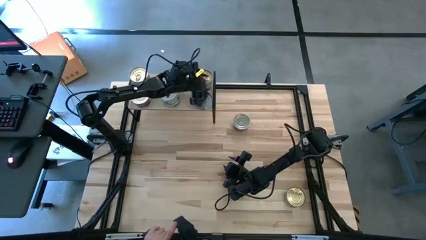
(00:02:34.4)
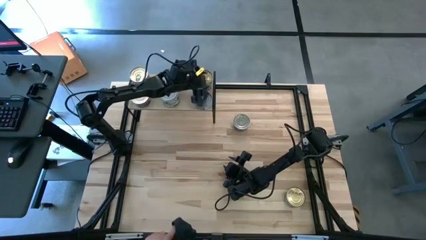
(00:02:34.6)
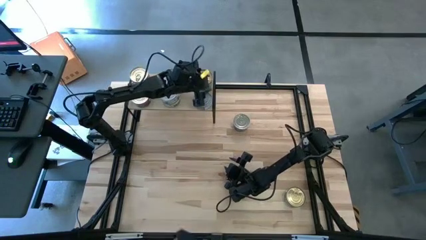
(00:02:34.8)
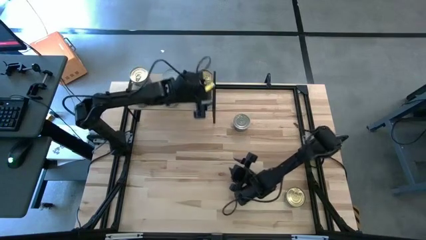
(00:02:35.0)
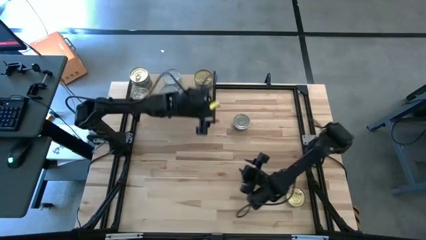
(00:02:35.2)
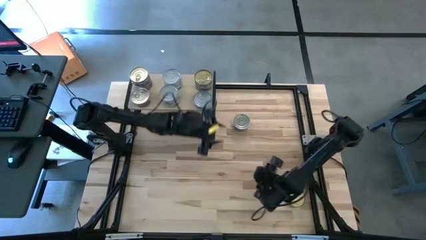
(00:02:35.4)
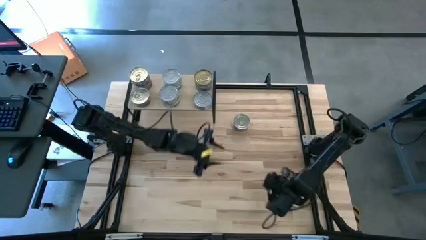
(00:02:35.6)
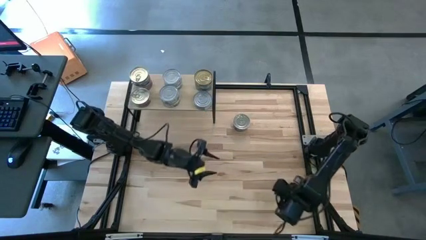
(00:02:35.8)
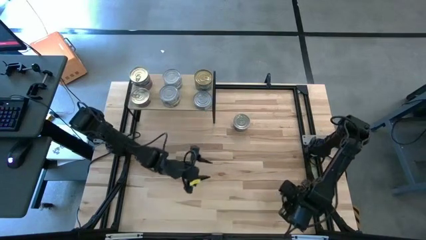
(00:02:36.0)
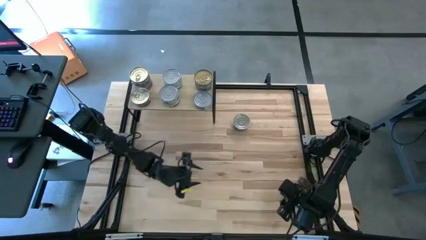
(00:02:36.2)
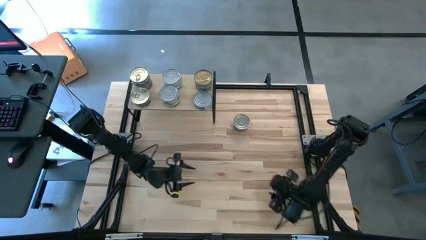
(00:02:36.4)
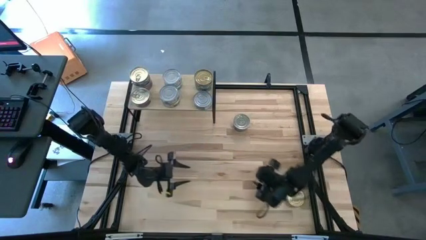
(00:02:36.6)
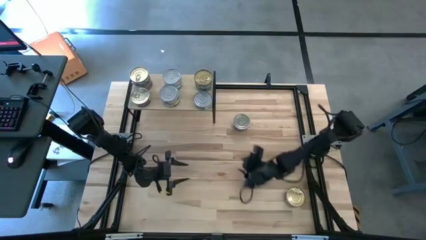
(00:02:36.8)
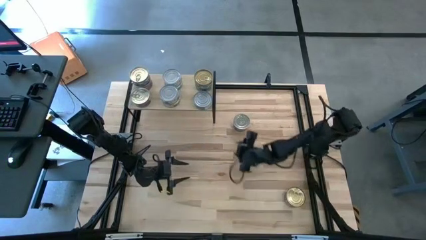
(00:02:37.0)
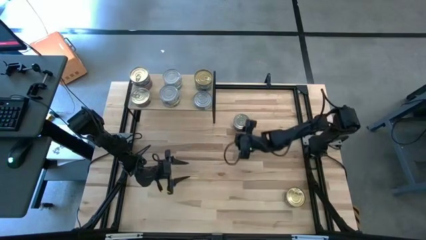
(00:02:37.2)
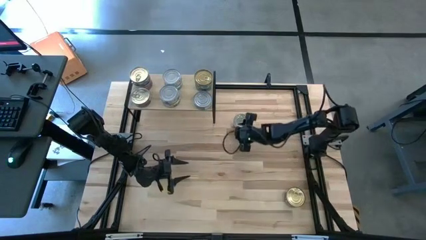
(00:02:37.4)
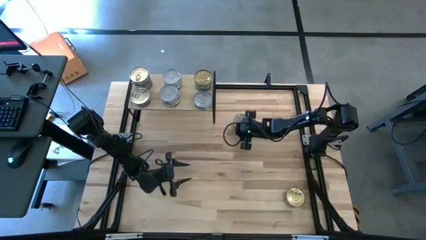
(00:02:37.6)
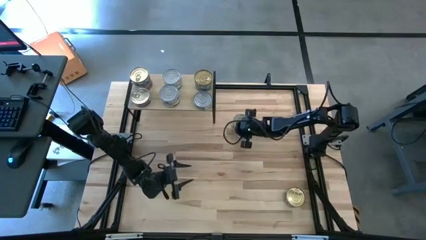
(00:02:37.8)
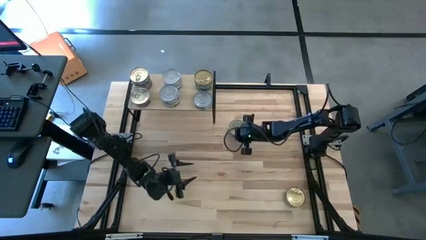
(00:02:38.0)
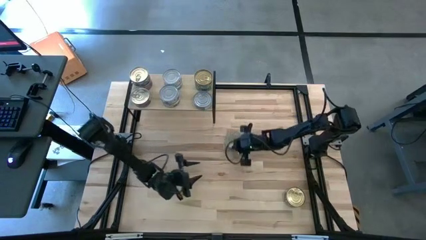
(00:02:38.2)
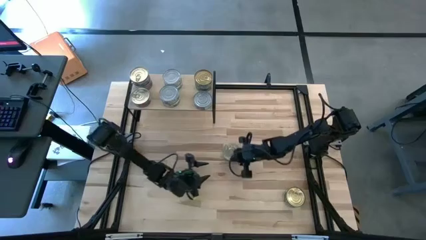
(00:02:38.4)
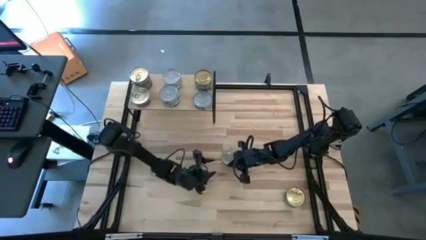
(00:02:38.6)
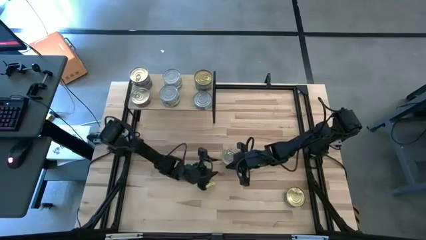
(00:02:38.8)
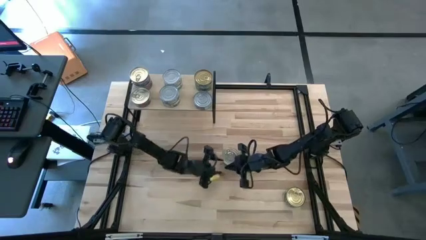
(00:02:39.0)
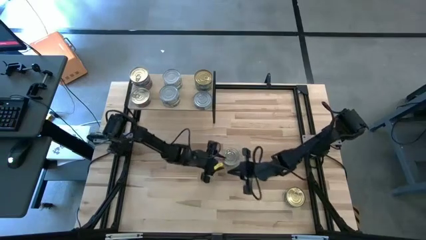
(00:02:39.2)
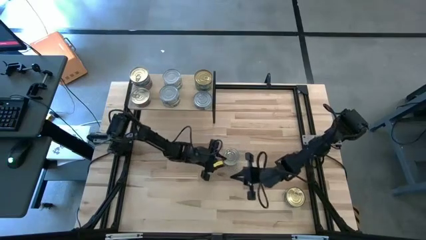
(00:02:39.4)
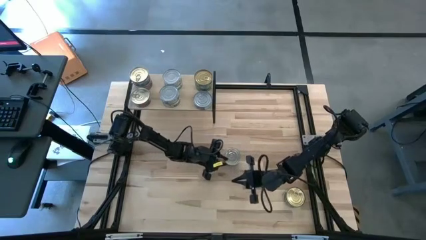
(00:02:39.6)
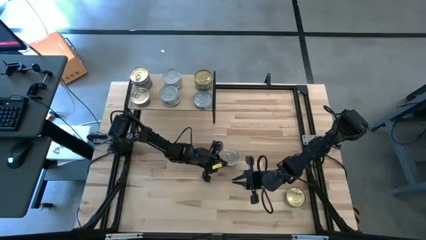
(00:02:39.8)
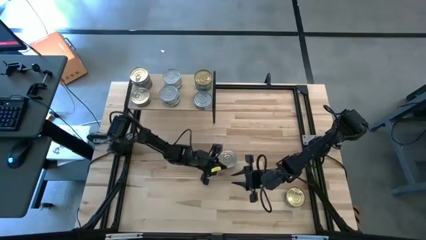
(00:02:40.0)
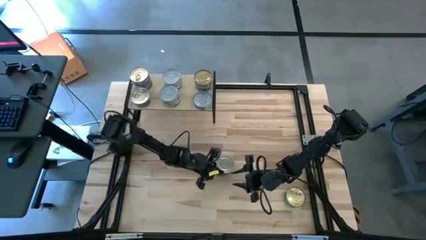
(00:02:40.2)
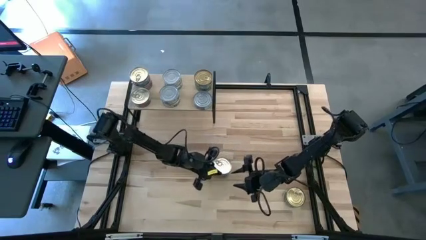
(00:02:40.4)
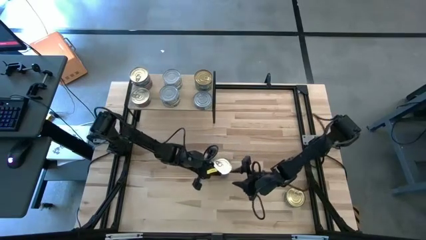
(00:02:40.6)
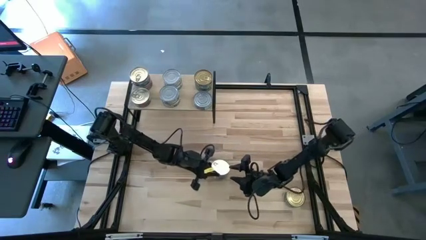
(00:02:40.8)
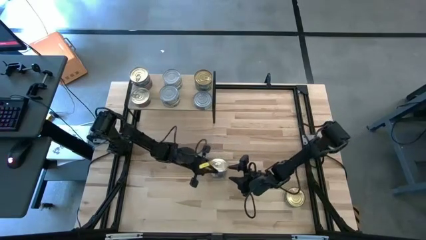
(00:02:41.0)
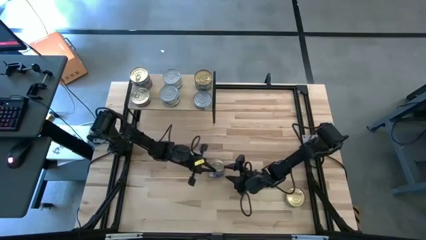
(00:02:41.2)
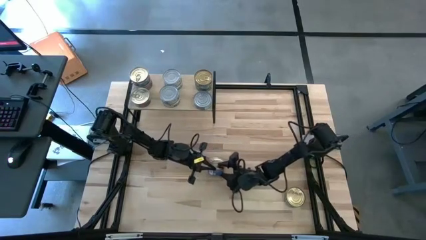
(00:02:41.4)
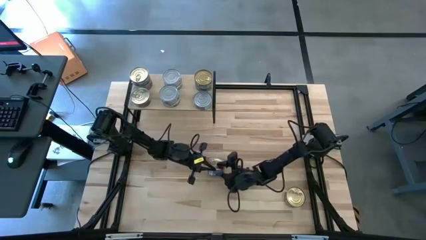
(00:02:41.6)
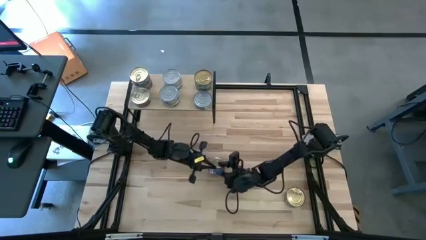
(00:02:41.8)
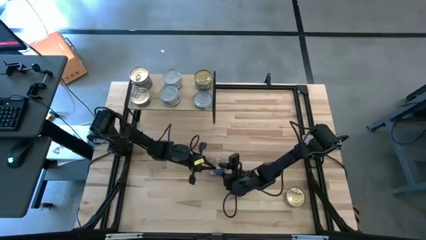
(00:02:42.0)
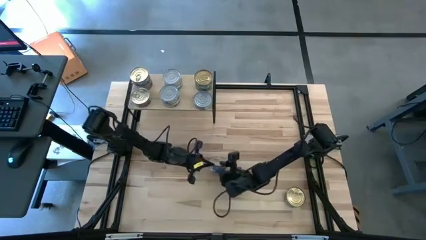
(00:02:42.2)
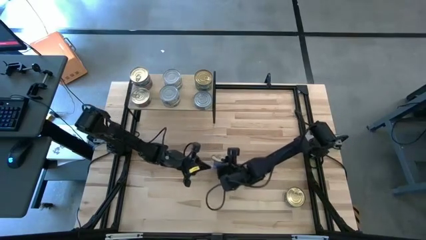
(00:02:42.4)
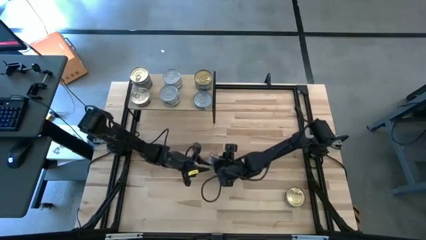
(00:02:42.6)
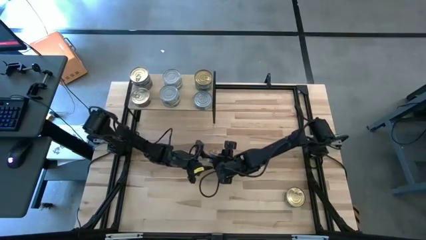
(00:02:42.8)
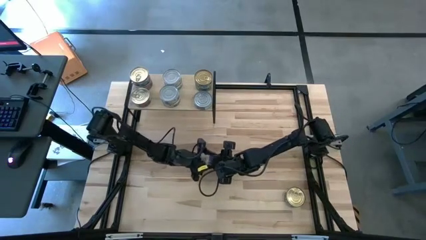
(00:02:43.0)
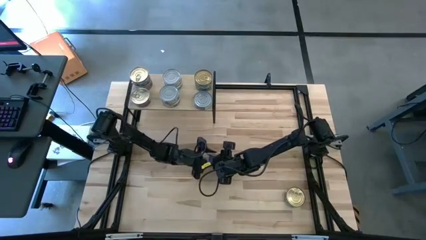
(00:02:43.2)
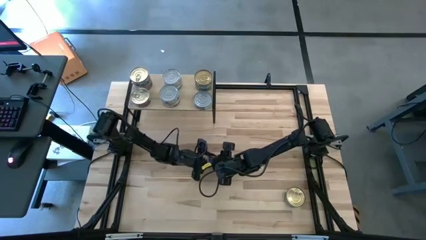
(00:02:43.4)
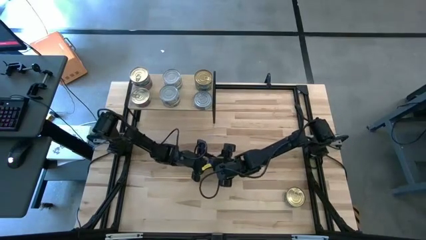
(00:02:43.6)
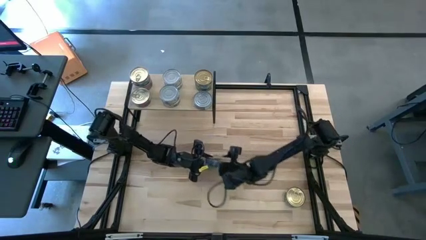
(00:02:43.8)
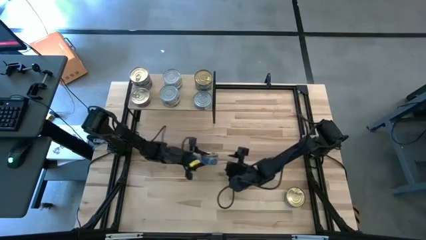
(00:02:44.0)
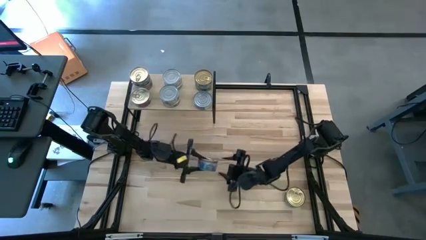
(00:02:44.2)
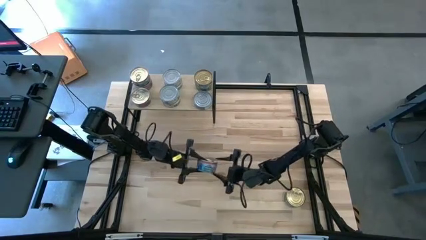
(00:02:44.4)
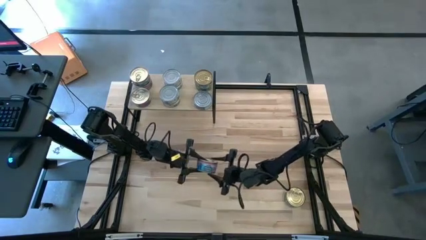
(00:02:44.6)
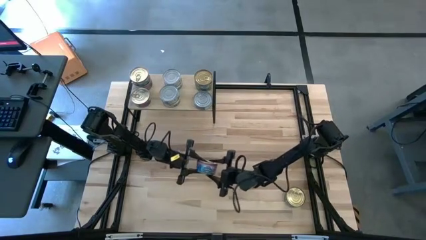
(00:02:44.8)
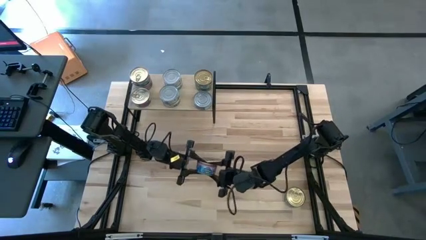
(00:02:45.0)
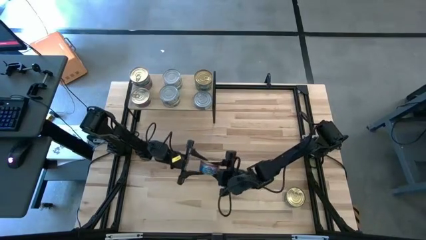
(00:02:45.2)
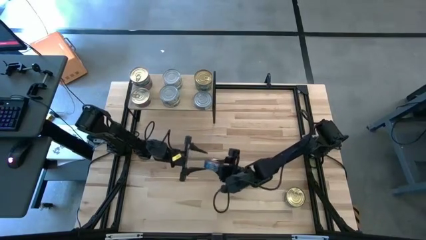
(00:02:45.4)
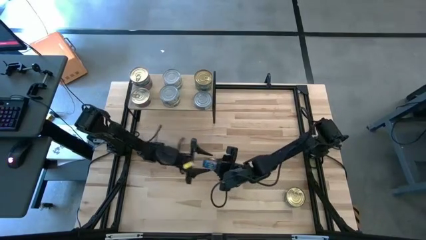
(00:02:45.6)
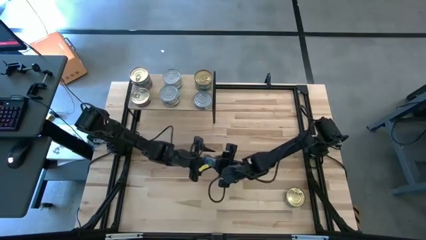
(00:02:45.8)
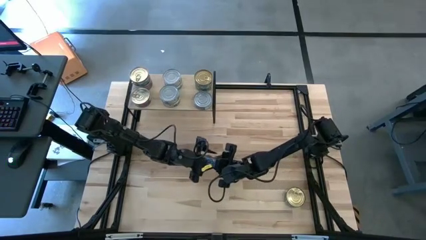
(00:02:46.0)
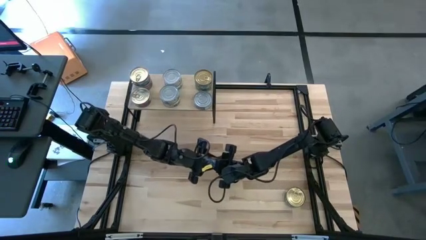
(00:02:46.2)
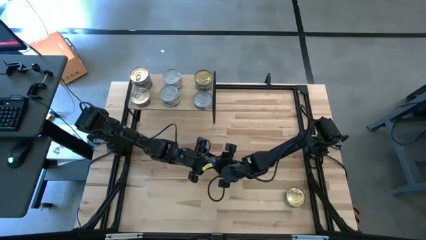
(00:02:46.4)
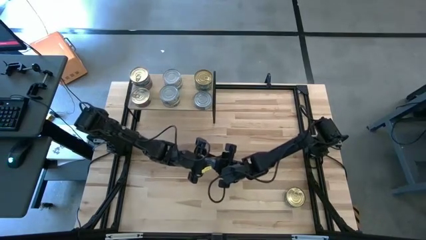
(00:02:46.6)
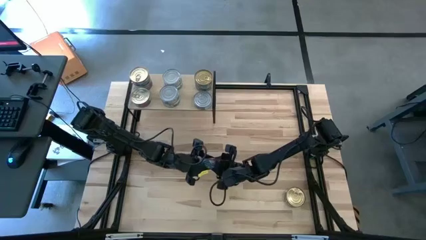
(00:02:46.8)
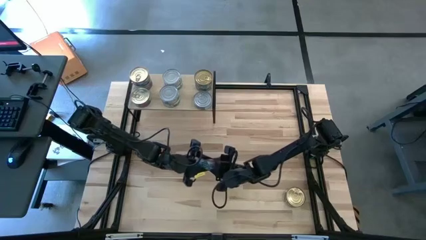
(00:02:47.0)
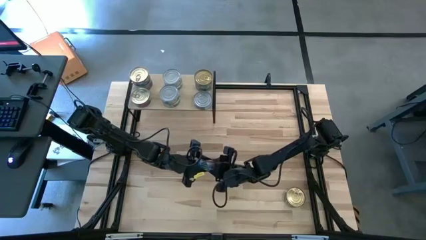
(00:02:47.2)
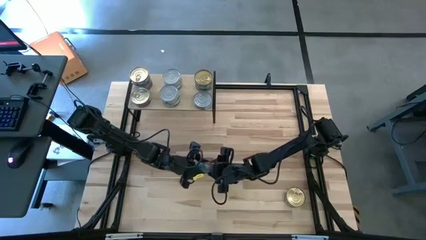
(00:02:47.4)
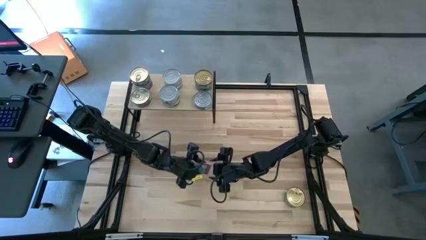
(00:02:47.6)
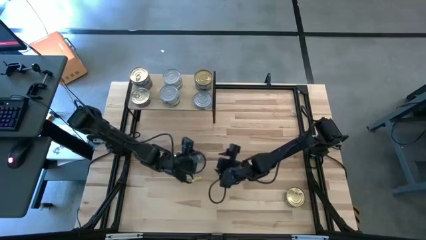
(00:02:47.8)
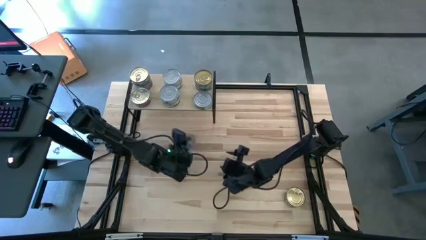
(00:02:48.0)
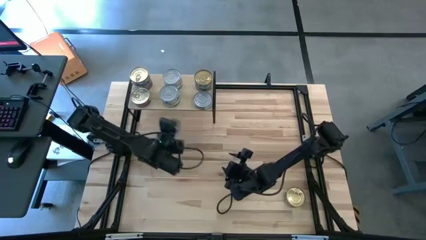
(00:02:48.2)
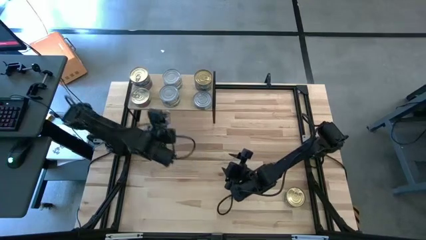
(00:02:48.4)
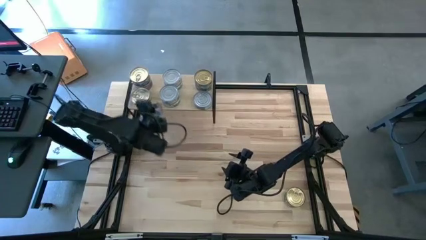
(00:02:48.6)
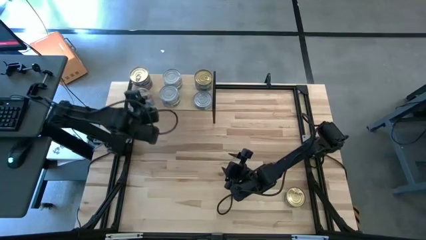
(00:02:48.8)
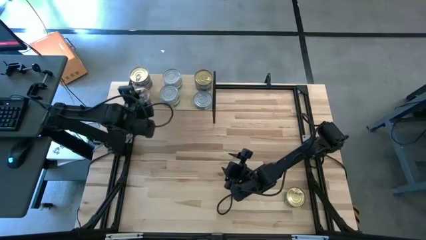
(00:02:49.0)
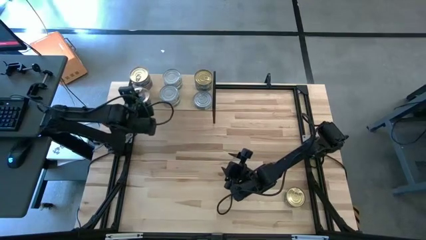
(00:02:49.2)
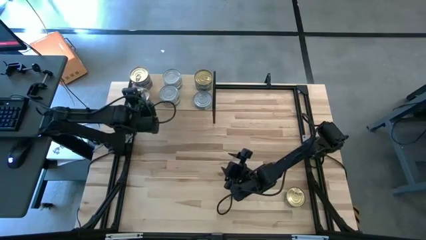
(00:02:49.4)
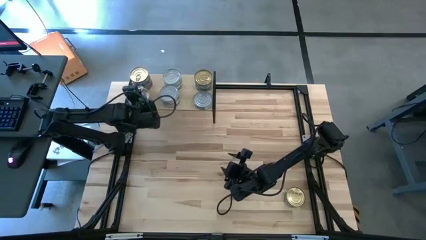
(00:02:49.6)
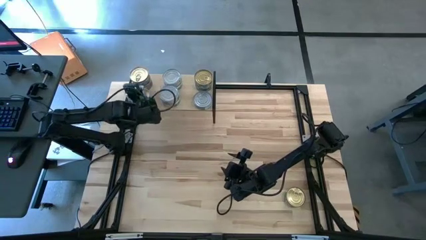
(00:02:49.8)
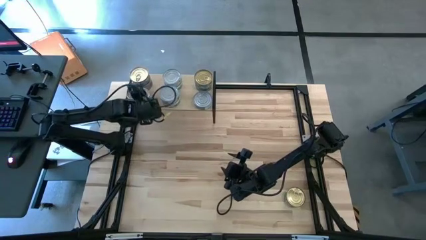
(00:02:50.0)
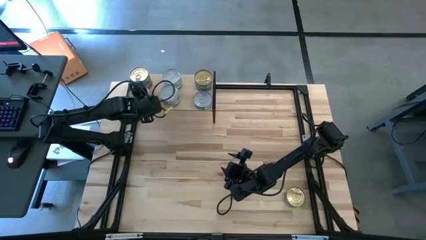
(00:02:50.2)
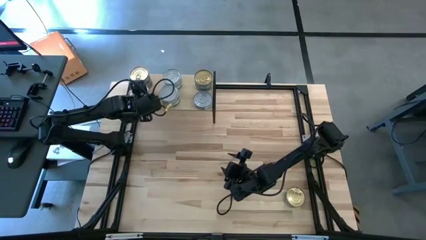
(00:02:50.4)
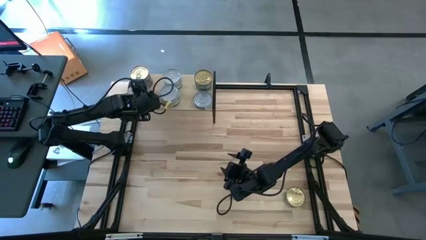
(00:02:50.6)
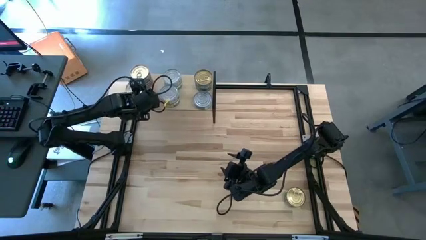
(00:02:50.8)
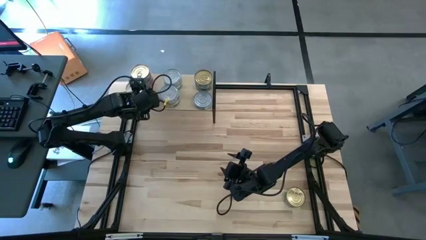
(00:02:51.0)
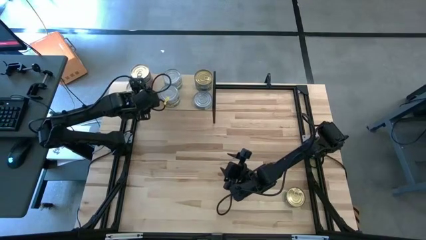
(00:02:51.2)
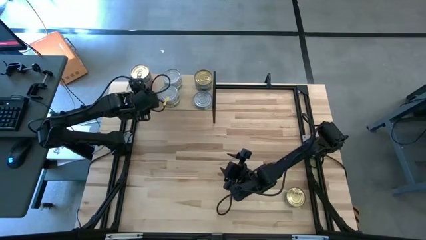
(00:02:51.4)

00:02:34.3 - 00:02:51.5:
Task: Stack canned seafood by type on shelf
Stack the blue tuna can on top of the other blue tuna can on the shelf

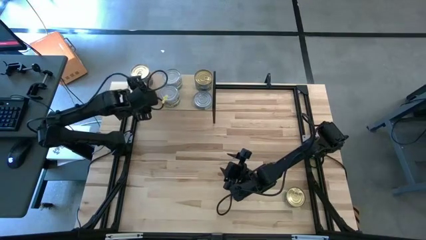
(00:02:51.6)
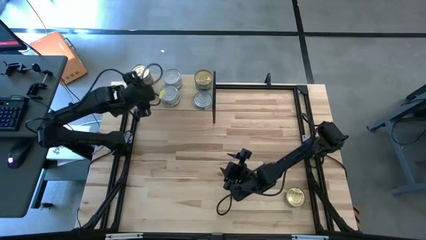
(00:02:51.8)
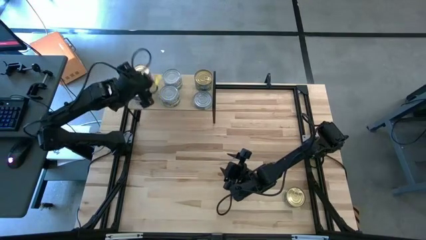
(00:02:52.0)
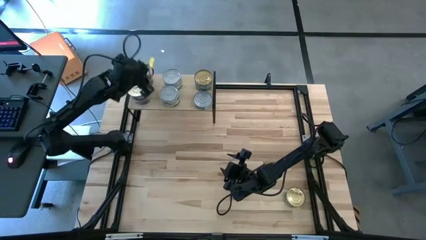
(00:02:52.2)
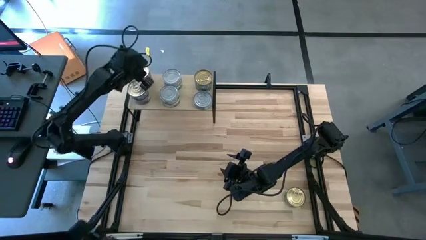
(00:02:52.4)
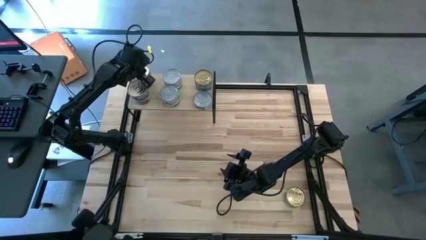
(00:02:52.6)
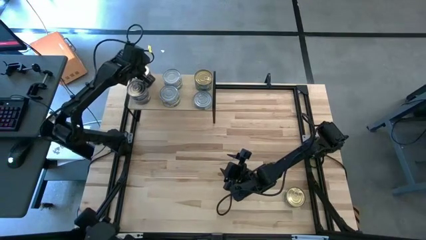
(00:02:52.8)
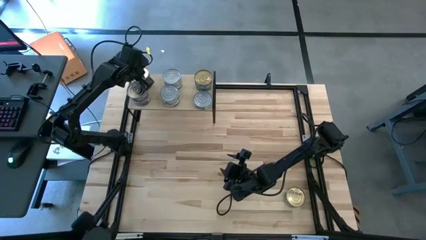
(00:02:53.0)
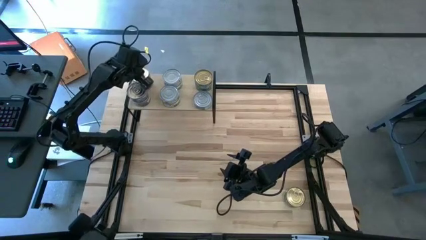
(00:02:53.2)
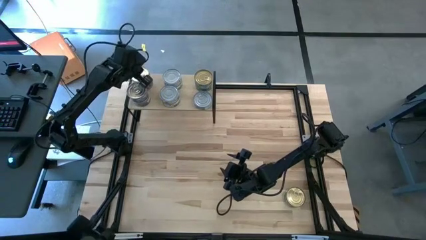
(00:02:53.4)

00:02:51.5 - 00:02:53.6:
Adjust the stacked blue tuna cans on the shelf
